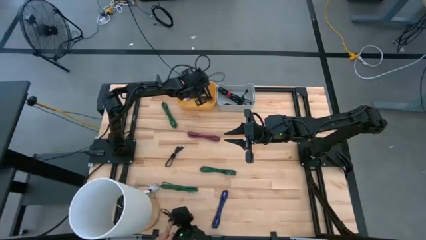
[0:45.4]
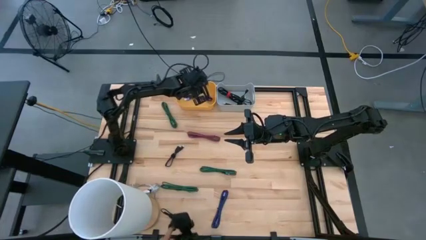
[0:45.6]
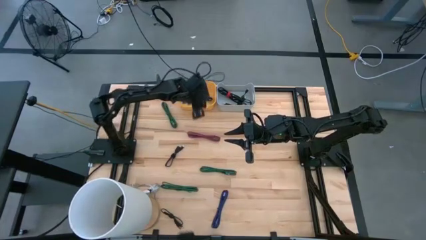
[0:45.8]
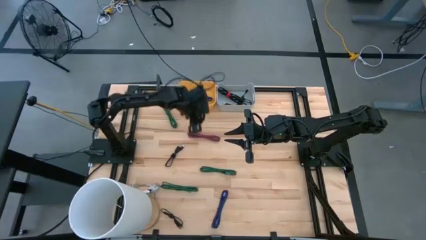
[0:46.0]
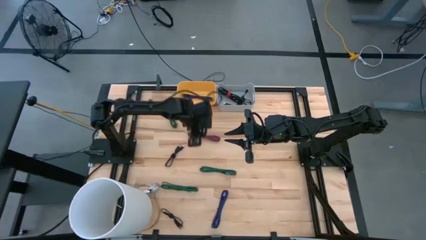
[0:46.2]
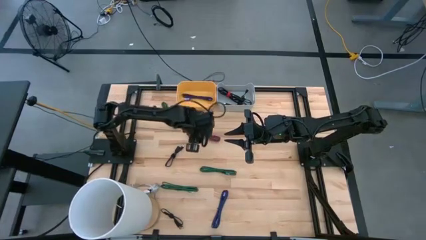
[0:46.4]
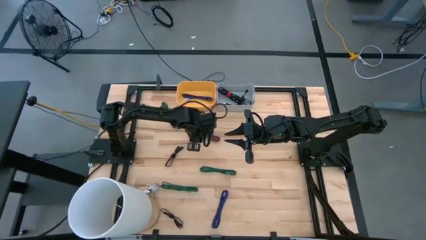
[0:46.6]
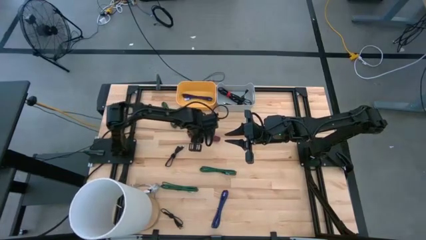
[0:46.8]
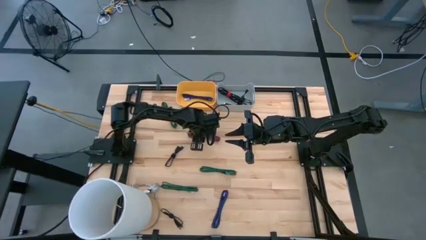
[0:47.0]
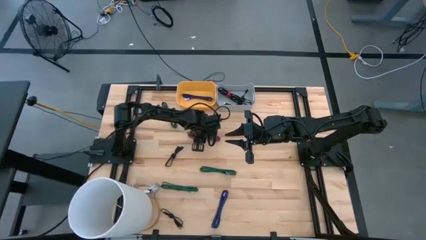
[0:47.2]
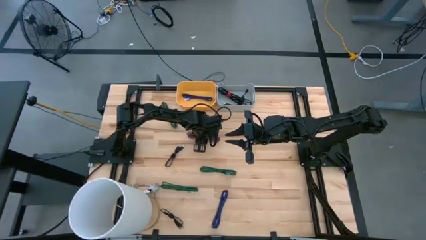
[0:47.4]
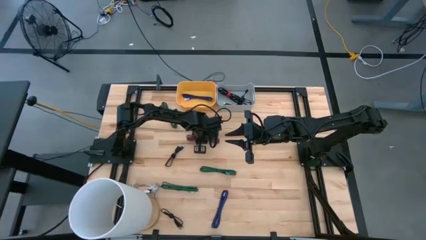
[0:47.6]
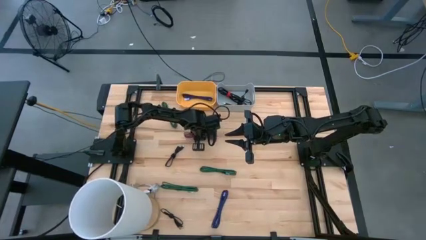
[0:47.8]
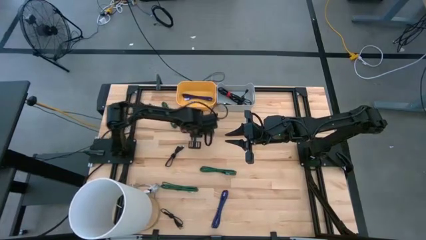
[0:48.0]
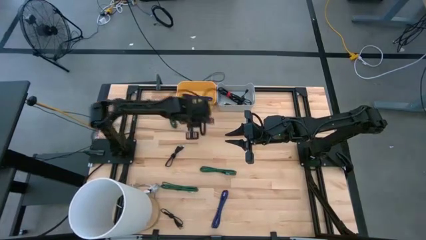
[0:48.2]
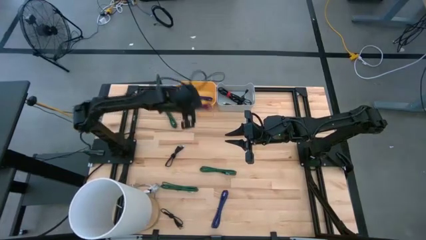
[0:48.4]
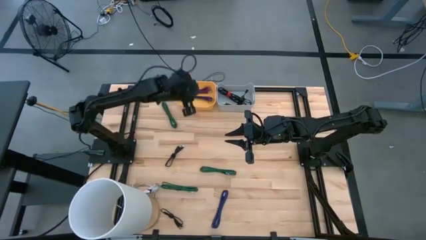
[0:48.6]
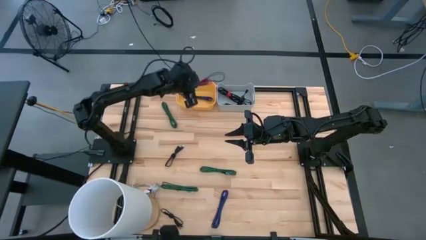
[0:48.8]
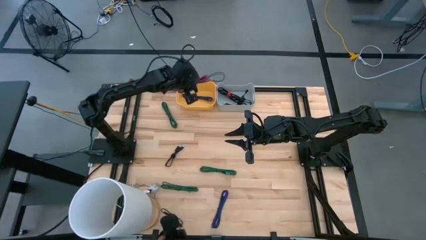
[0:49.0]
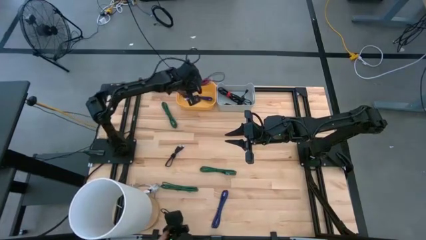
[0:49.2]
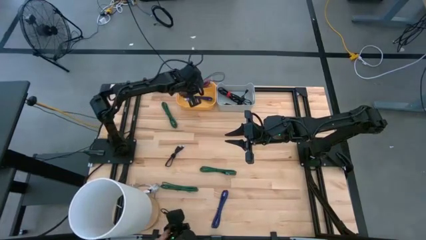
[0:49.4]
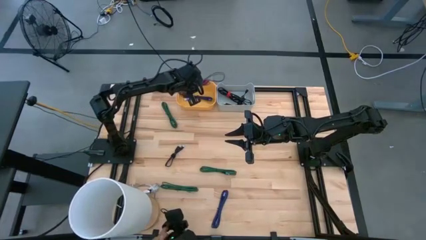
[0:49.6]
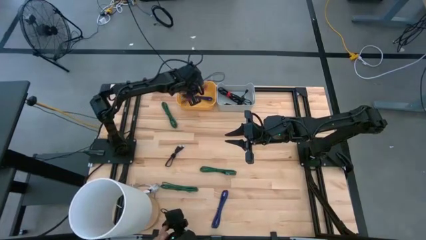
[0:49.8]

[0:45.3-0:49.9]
Task: Pick & Place USB Port
Put the pink black charger cable into the yellow bin

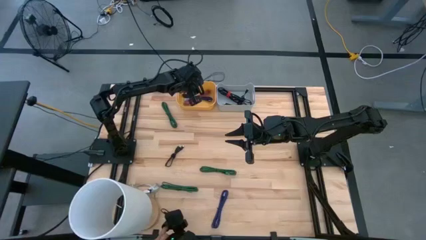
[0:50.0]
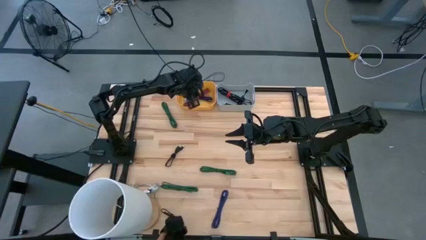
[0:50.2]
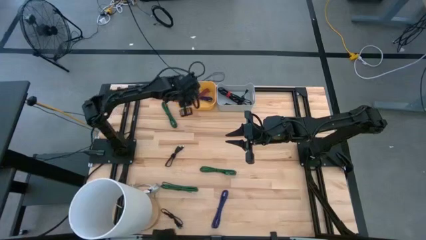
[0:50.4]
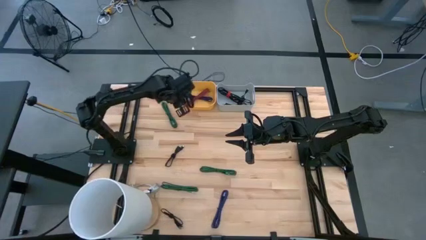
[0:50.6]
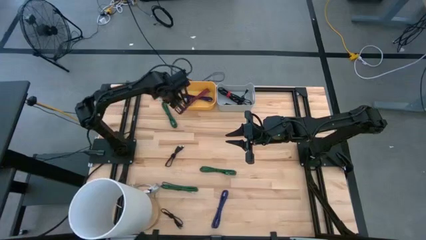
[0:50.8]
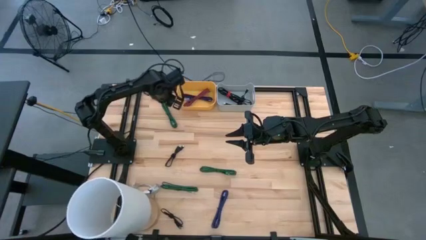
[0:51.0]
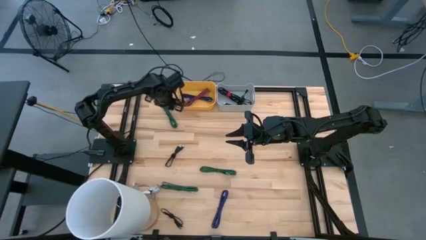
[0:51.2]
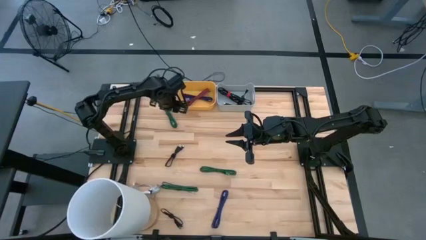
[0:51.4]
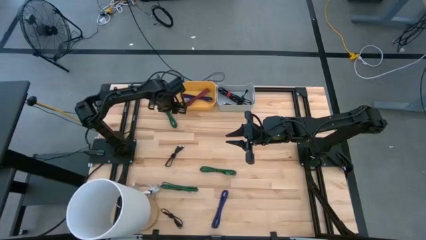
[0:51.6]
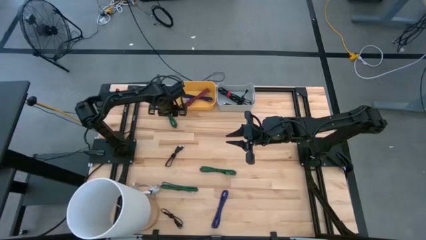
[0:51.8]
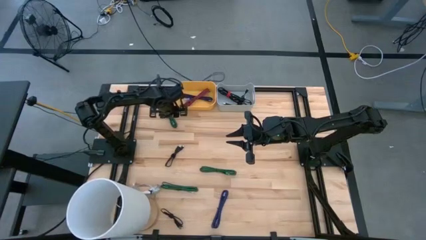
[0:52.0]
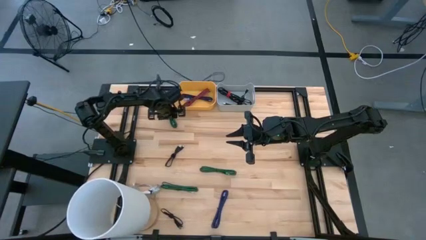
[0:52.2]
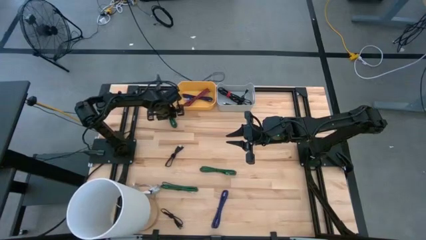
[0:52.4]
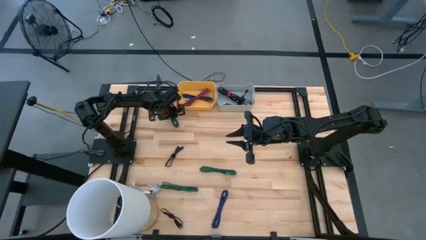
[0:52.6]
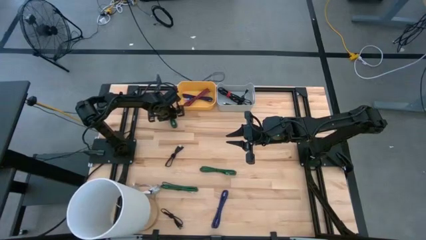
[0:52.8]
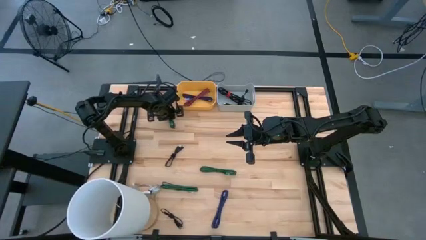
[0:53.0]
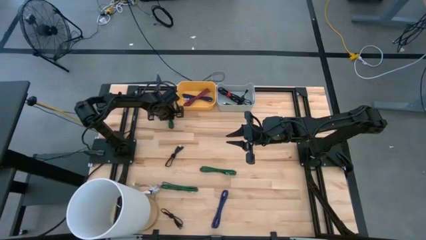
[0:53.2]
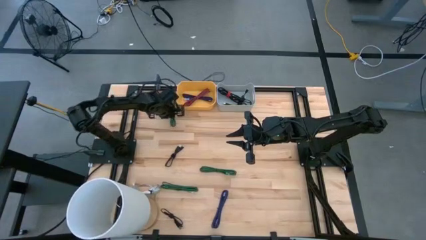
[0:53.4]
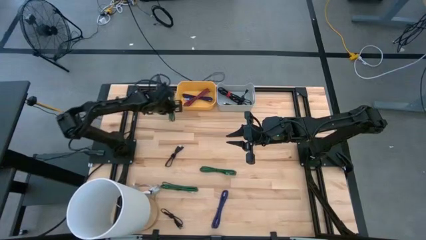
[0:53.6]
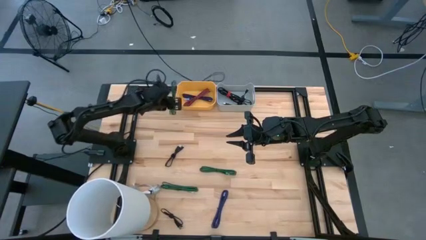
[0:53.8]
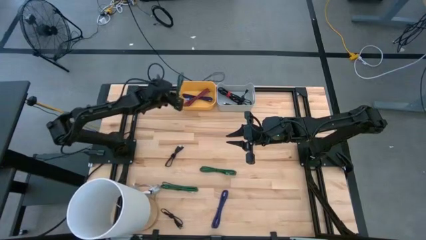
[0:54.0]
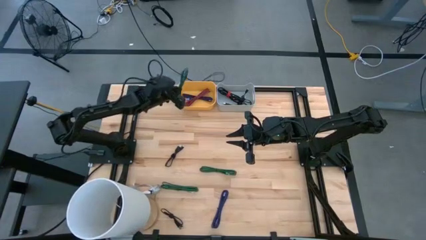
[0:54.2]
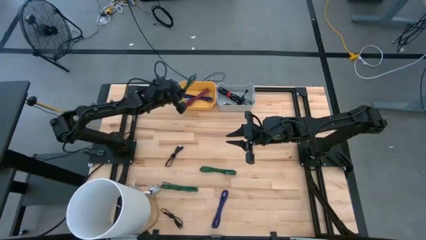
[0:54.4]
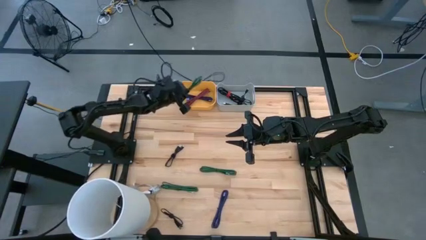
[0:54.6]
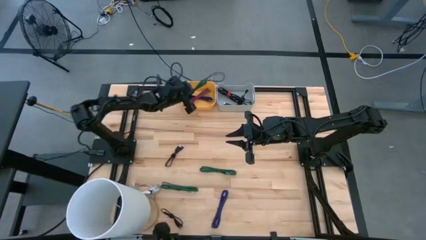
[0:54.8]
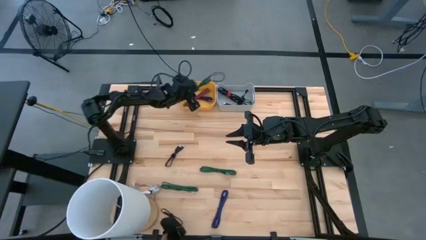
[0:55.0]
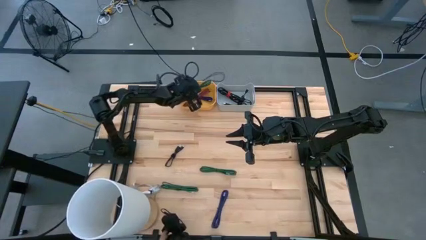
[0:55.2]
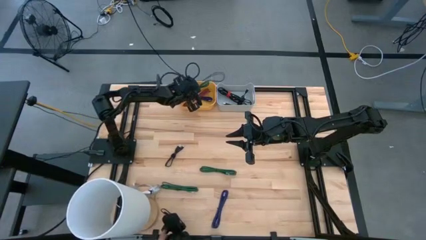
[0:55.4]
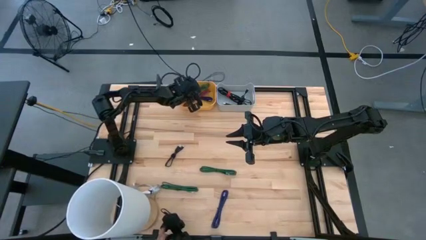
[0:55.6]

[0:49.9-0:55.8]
Put the green black charger cable into the yellow bin

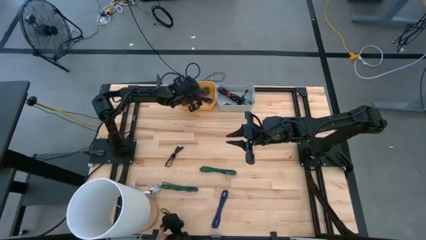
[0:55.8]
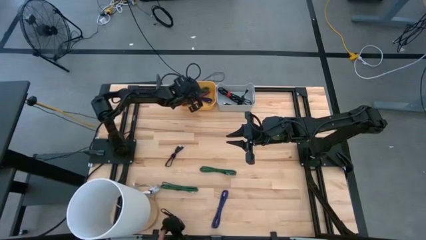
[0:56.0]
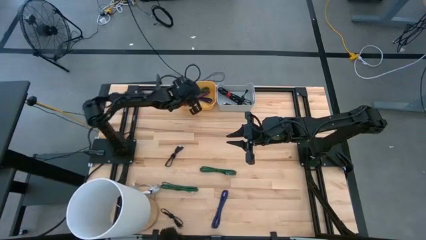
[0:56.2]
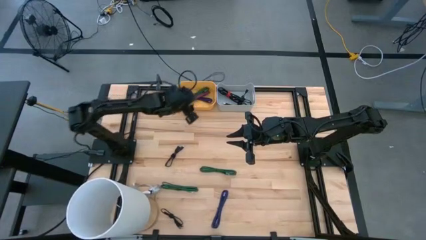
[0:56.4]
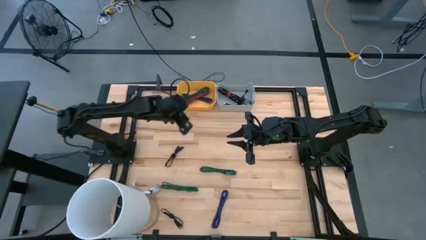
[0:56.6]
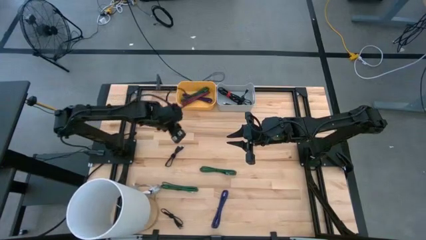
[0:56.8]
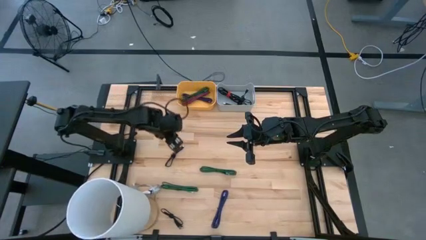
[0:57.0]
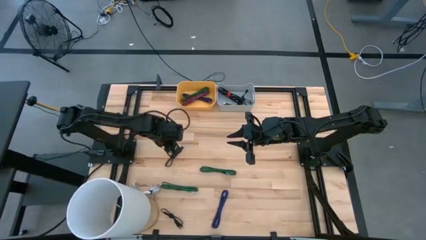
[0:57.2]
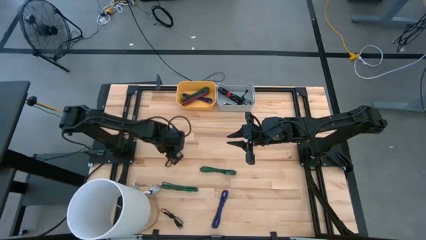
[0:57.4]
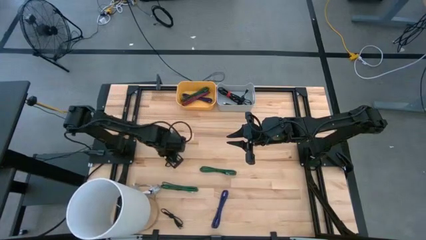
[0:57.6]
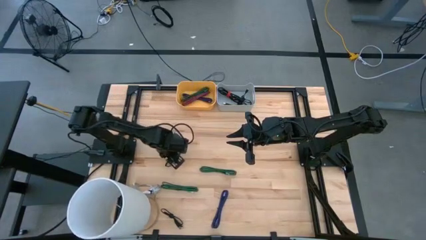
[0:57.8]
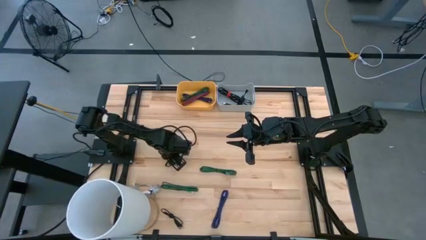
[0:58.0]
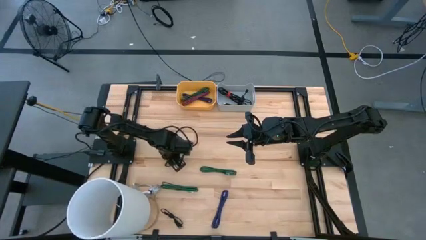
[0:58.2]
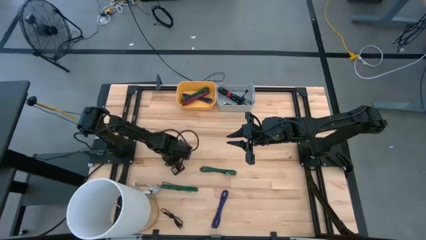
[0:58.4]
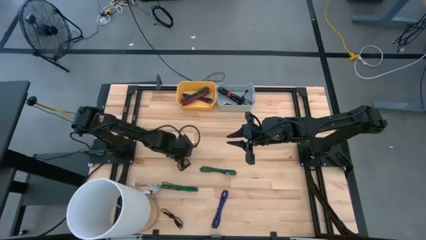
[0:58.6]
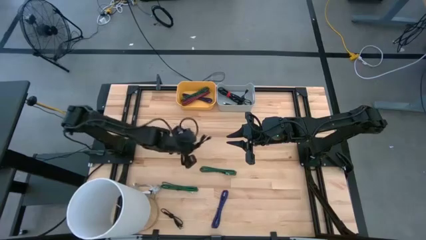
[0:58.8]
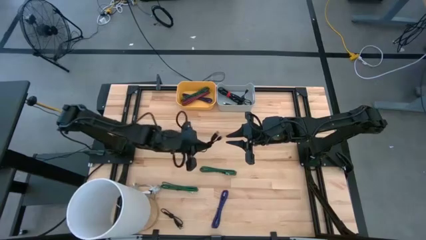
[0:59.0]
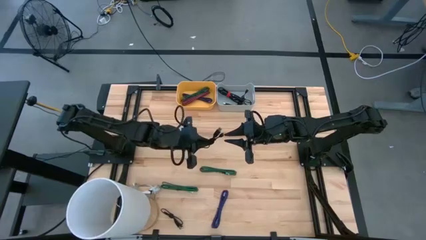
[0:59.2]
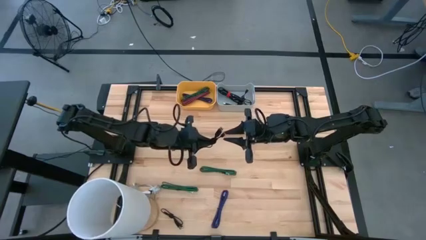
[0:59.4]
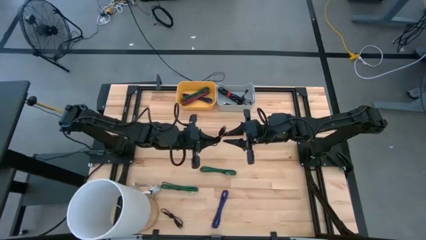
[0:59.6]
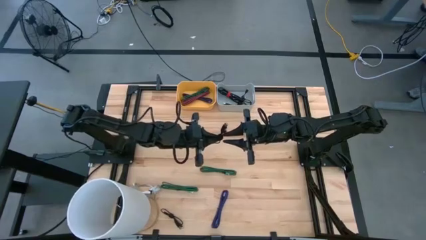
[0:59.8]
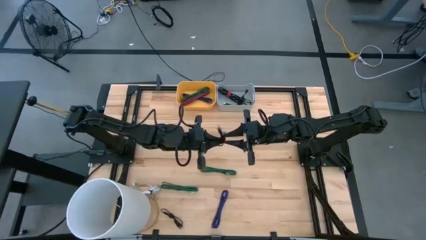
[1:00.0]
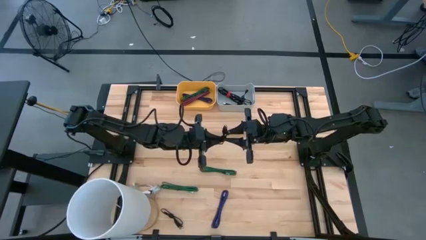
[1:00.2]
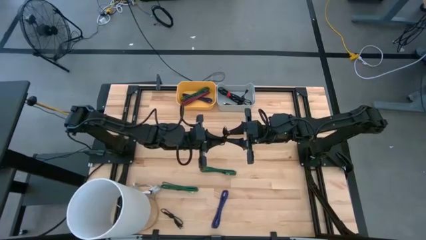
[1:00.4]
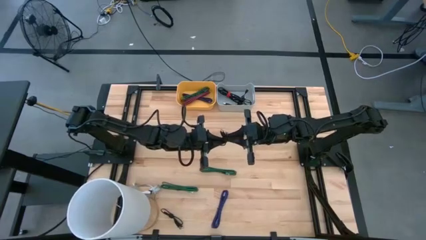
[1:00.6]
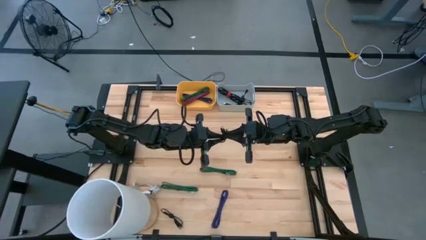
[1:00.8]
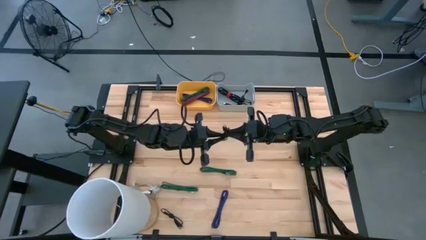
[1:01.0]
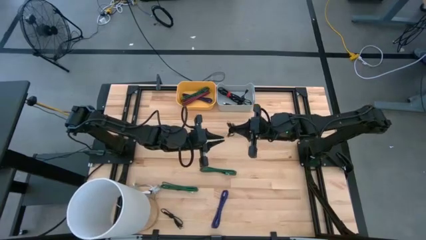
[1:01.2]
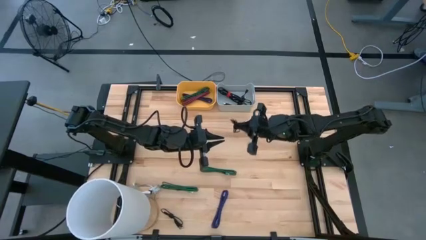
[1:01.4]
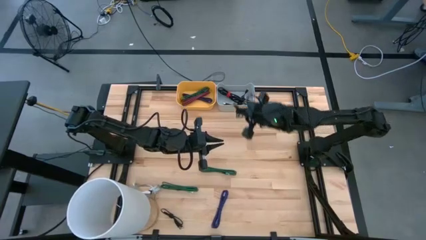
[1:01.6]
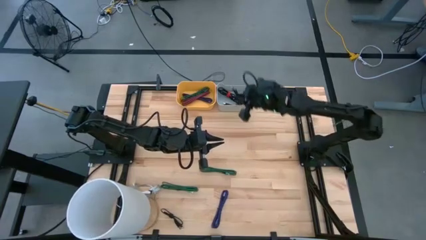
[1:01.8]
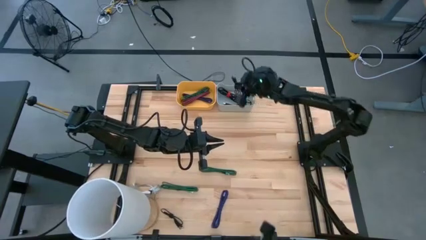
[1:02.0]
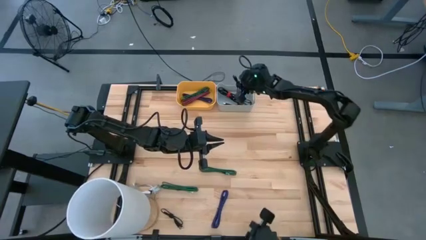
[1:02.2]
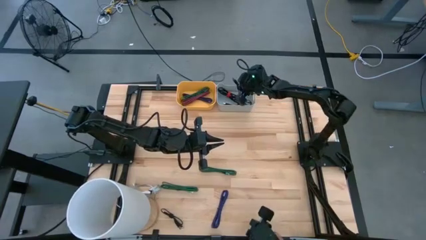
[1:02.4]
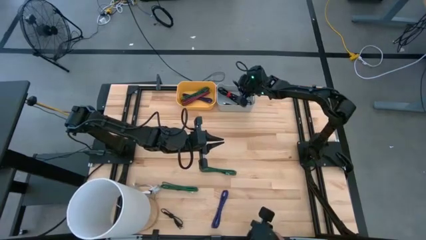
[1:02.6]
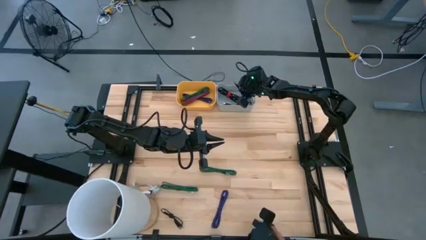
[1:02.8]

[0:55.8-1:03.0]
Put the black charger cable into the gray bin
